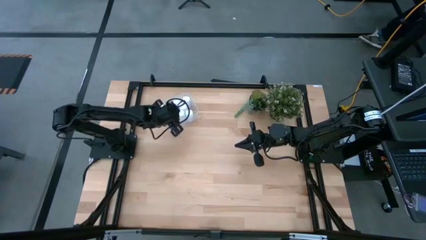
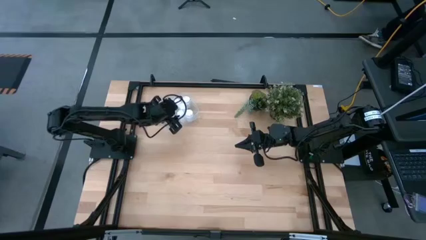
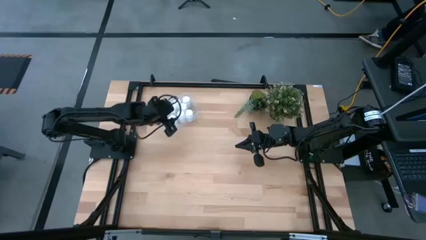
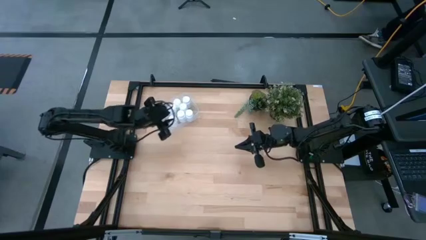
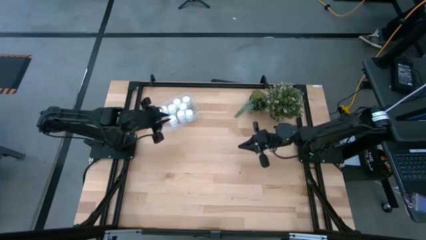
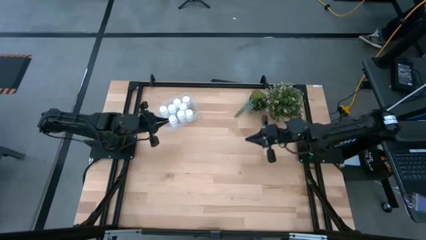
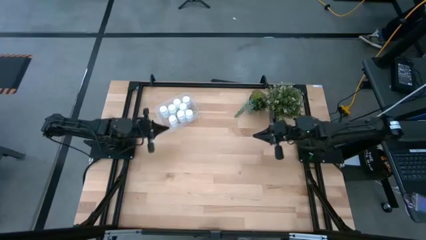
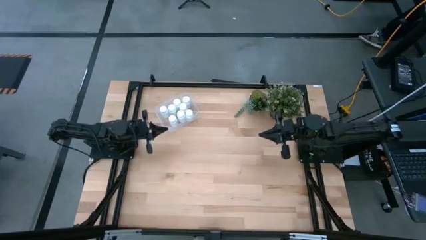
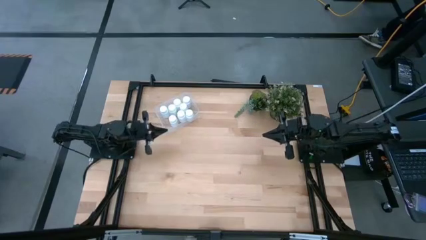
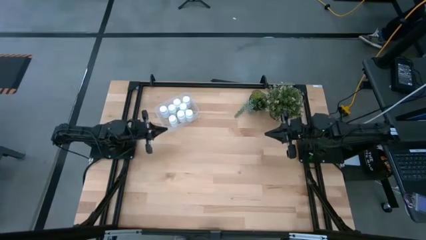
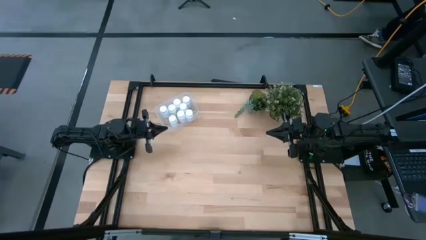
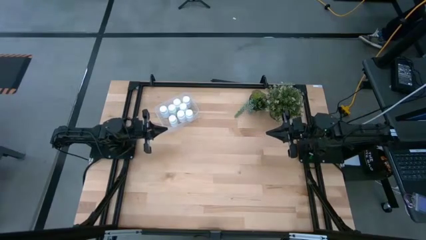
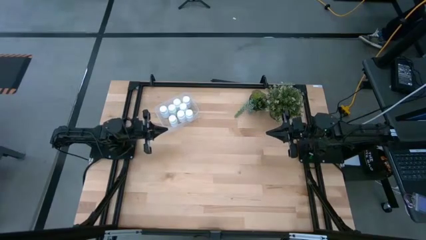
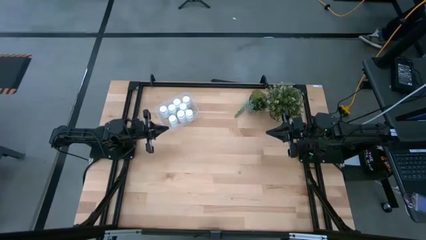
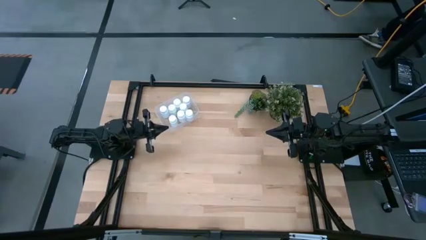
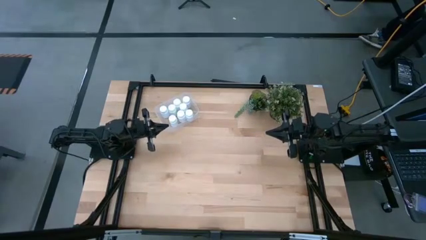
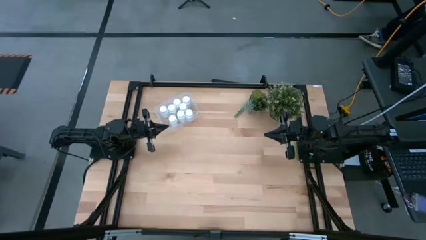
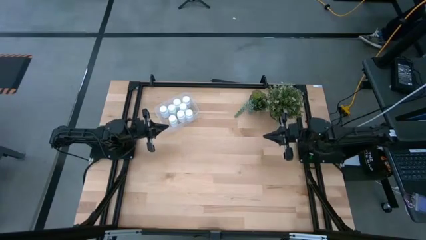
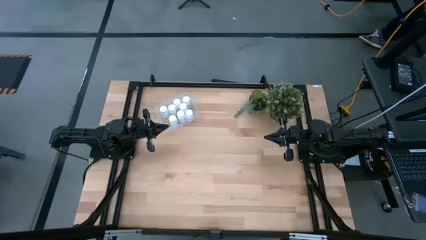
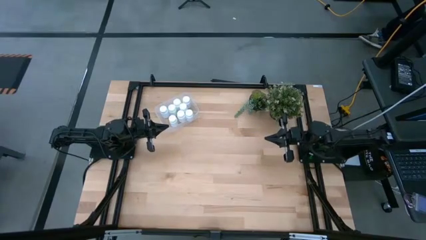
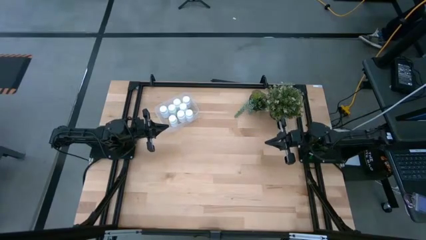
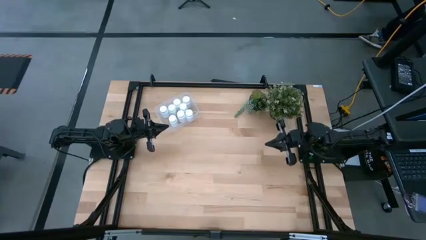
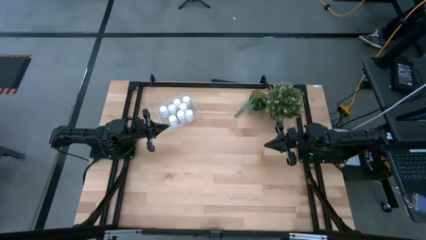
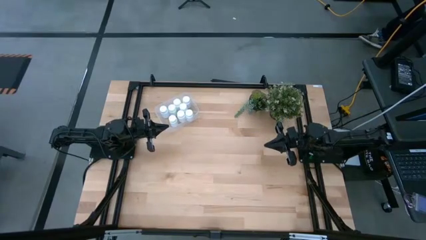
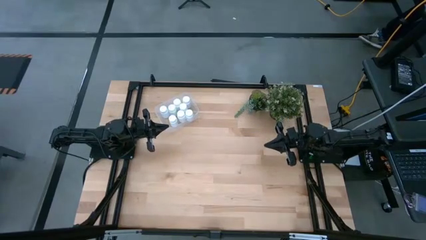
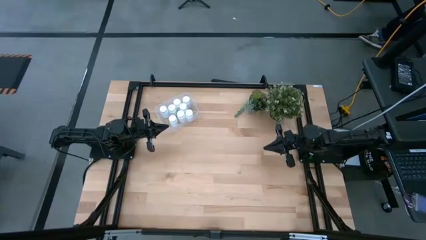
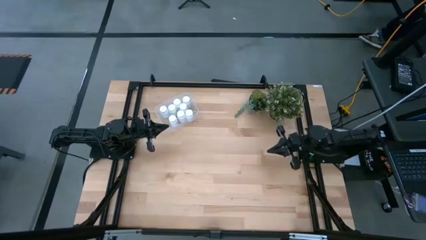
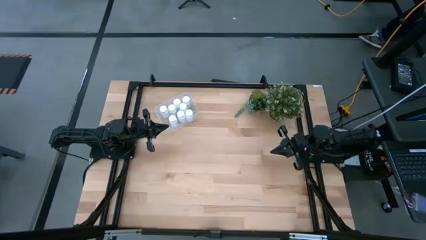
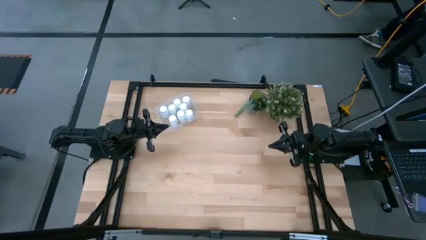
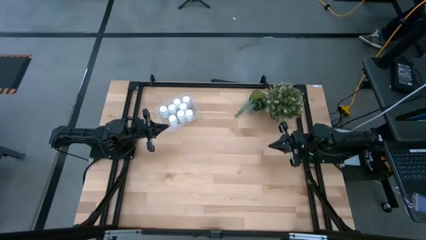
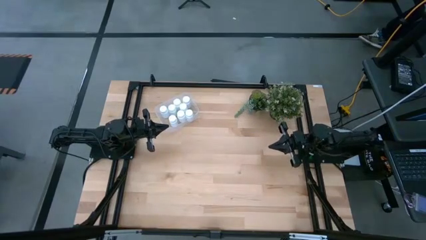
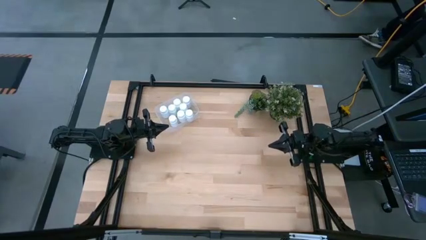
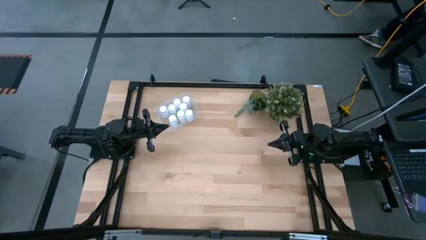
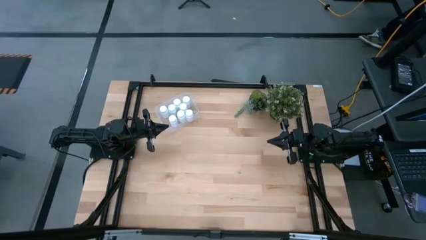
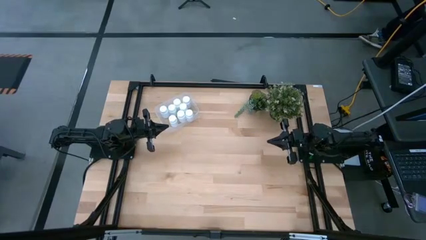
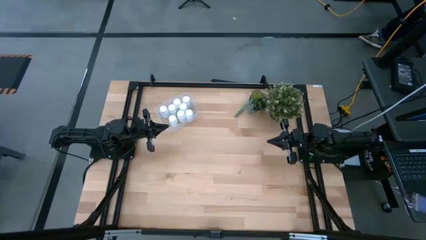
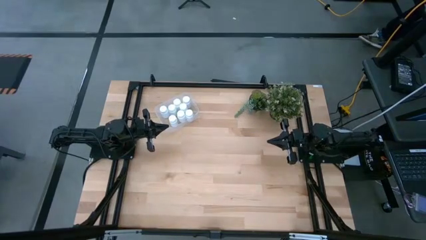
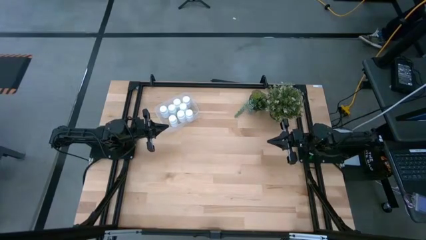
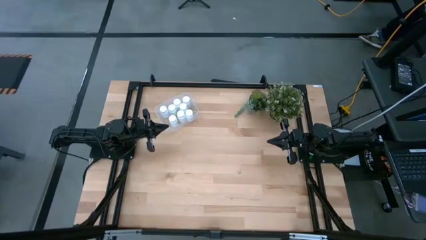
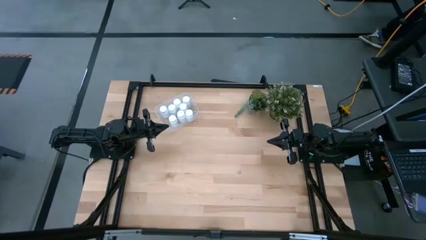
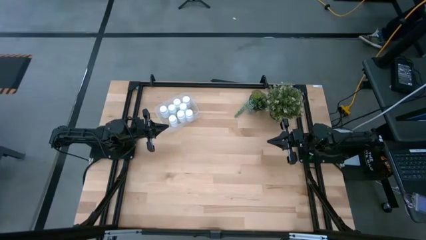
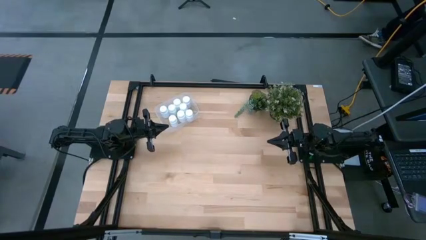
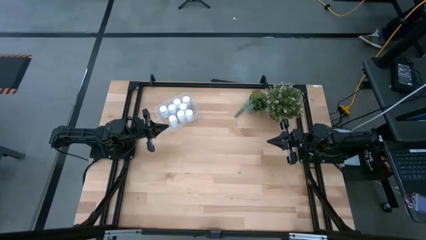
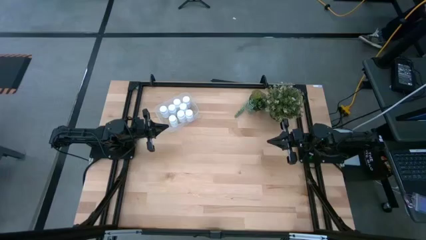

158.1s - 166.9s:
Task: Pick and place pill bottles into a basket
Return to Home Position
